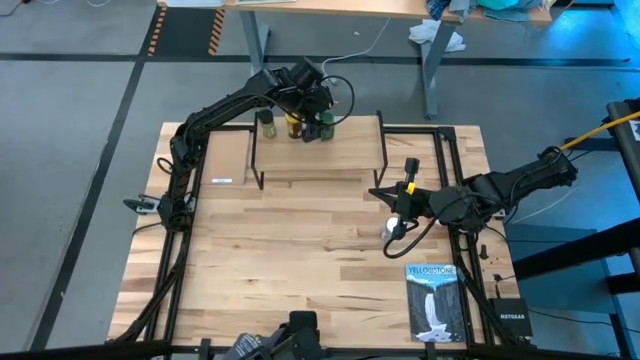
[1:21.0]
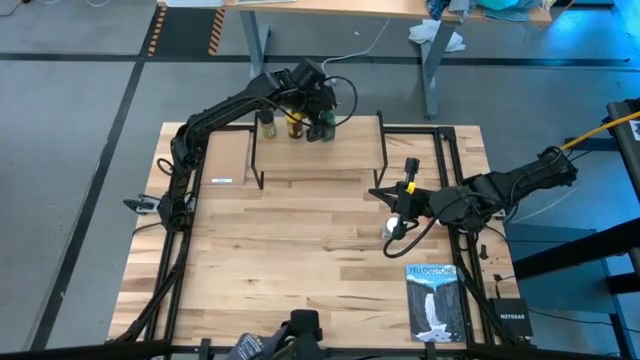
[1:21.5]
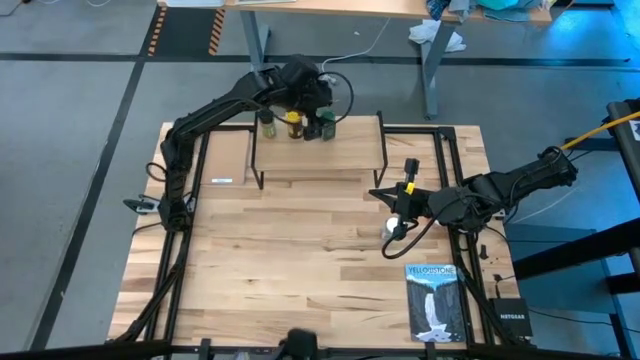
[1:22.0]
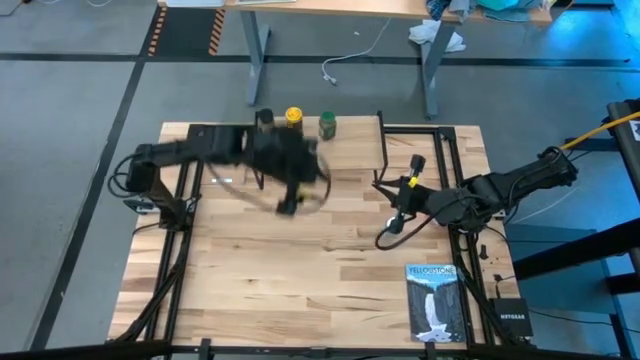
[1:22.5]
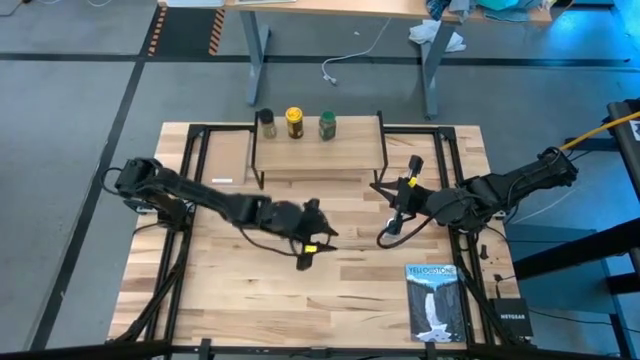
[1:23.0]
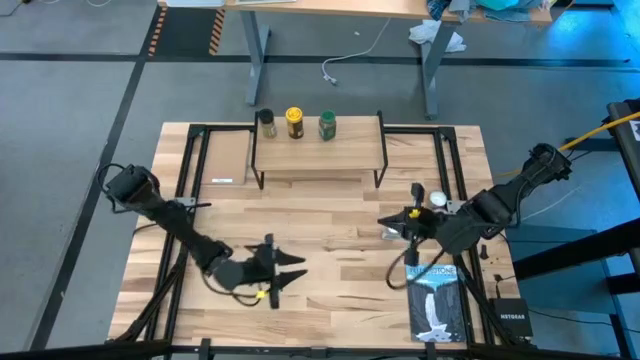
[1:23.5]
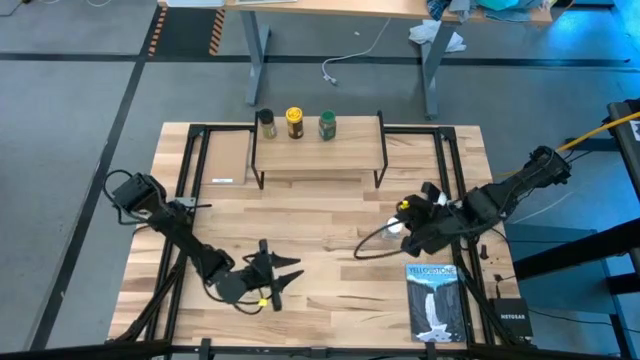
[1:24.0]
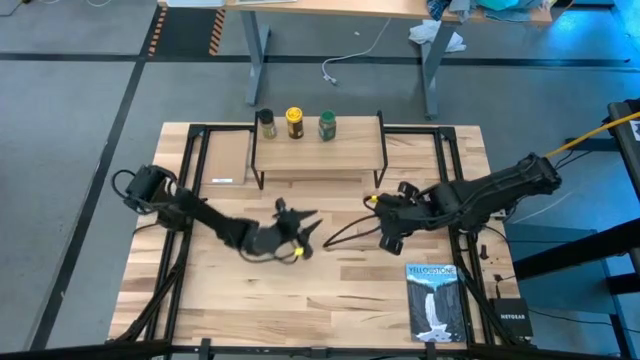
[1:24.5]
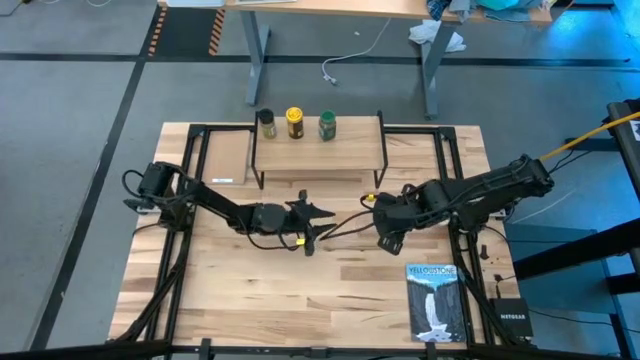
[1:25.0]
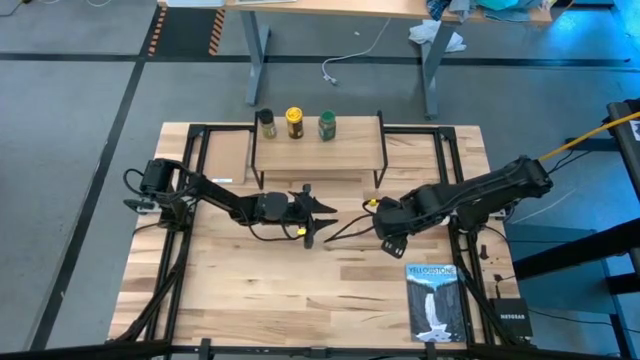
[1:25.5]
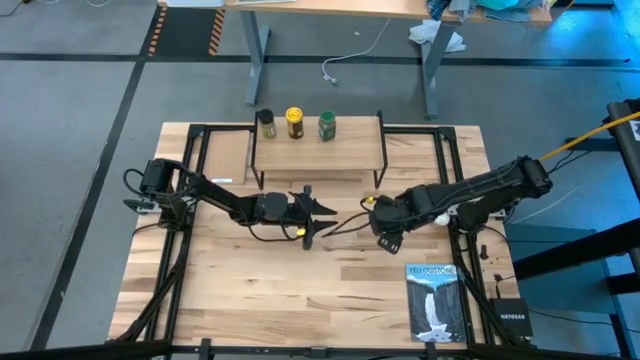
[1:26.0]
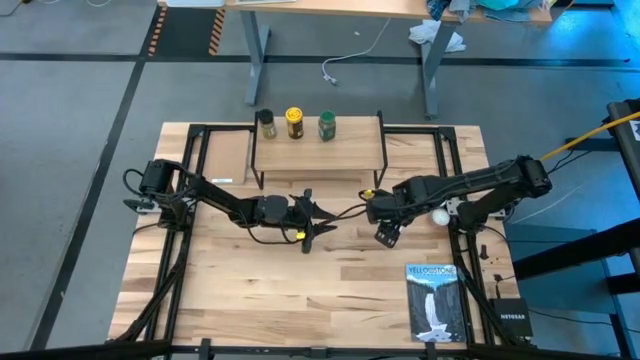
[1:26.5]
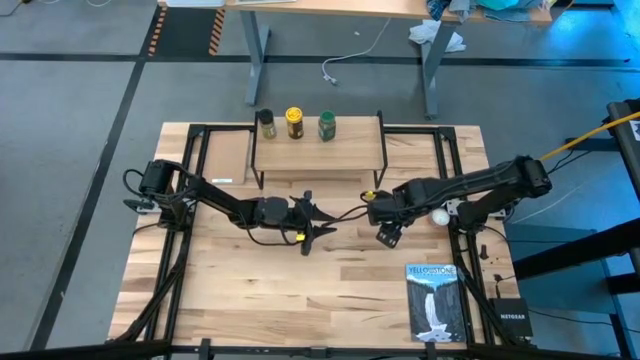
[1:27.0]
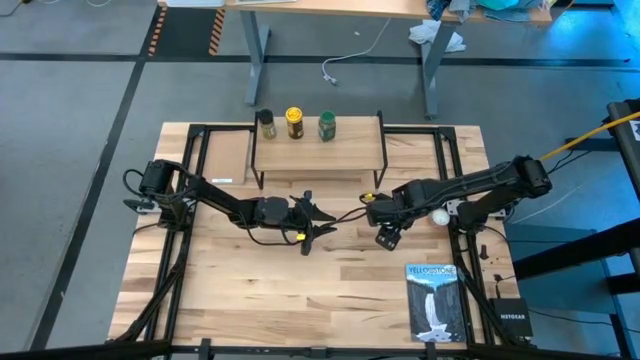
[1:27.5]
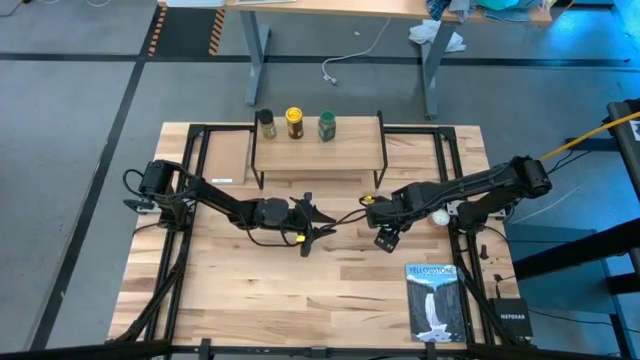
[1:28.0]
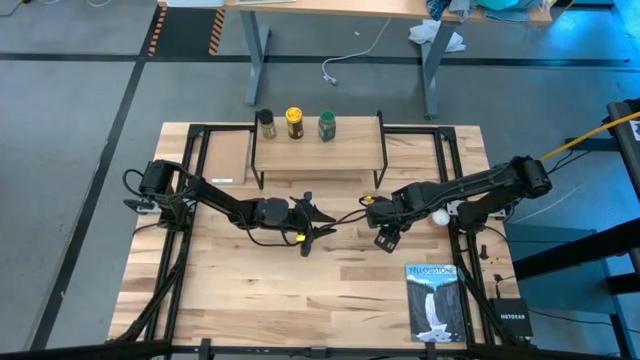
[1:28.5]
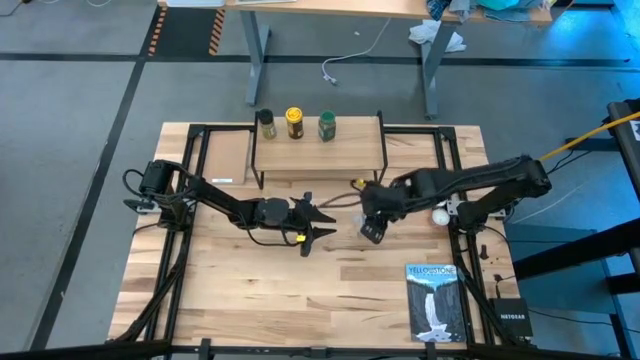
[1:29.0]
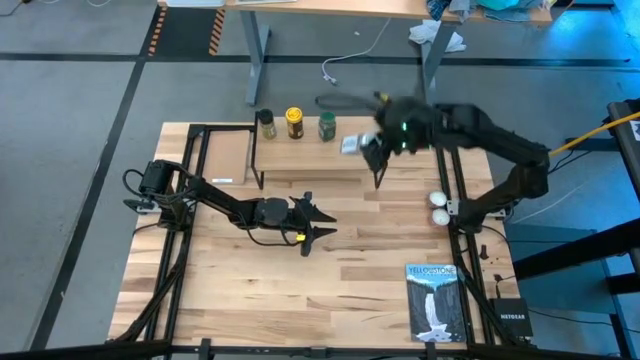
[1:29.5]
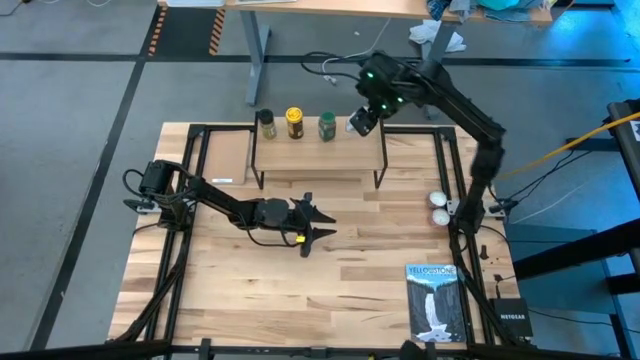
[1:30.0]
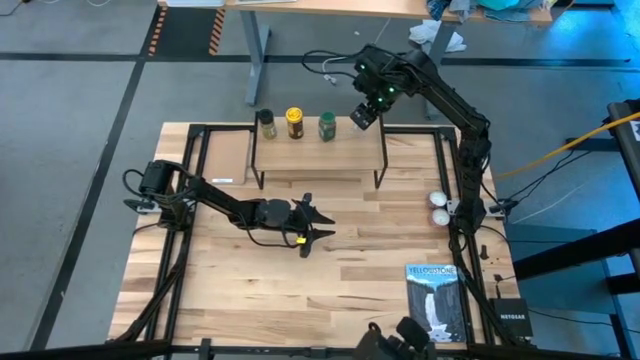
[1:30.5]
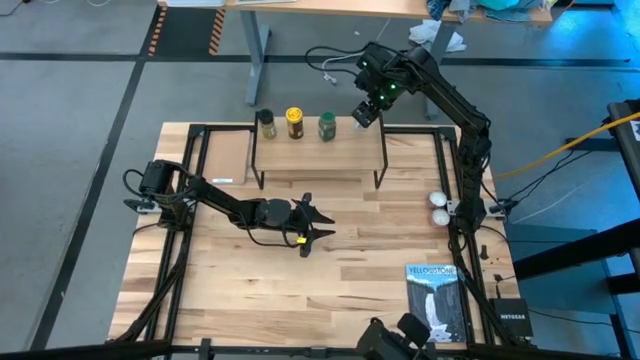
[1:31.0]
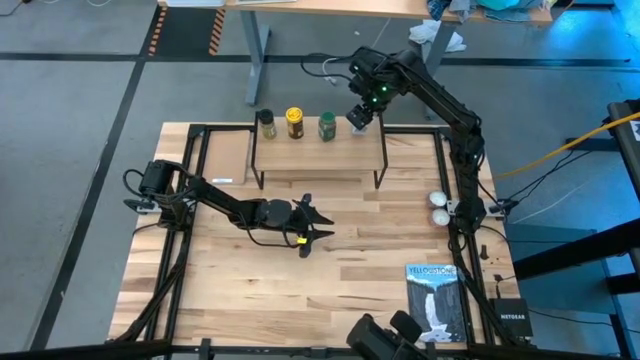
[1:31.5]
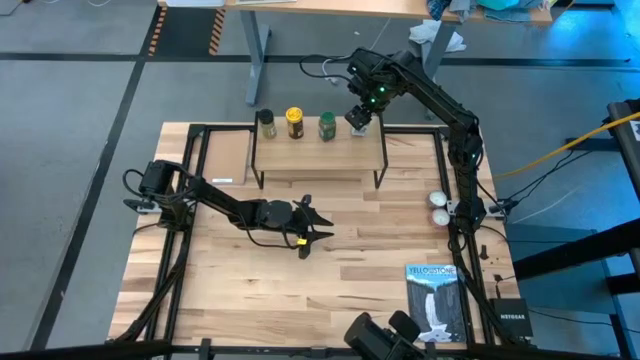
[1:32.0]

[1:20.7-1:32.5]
Task: Shelf spices
Put the white seasoning bottle on the shelf

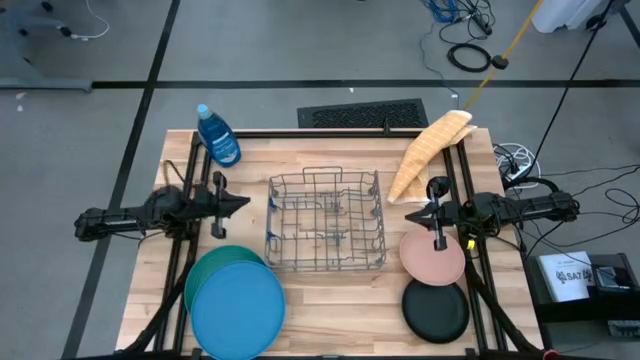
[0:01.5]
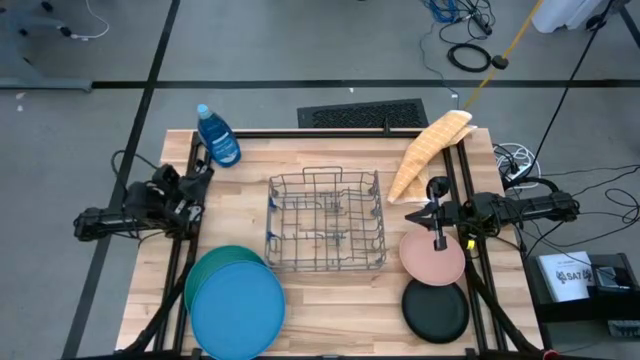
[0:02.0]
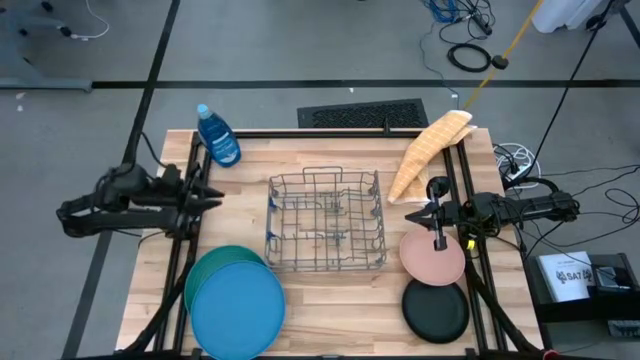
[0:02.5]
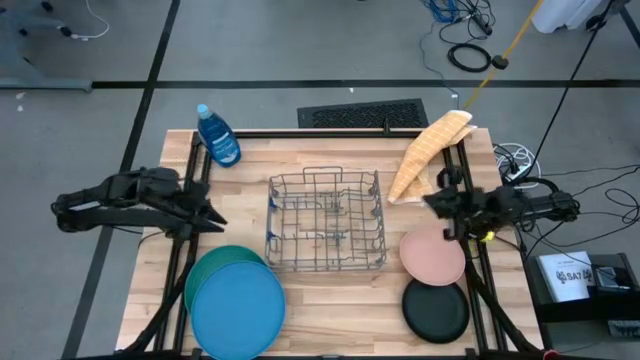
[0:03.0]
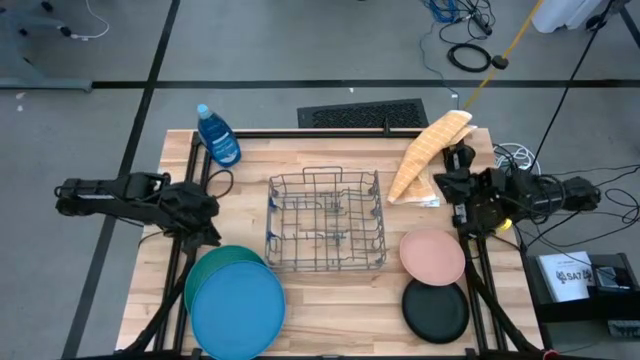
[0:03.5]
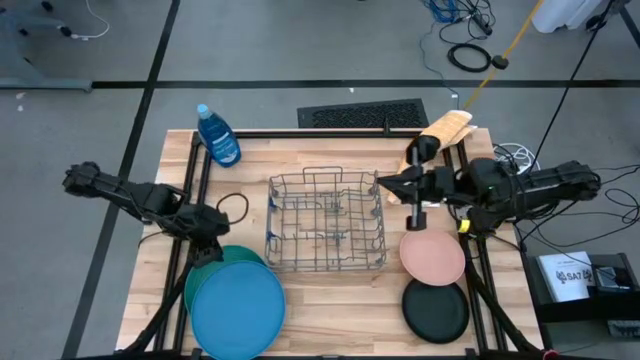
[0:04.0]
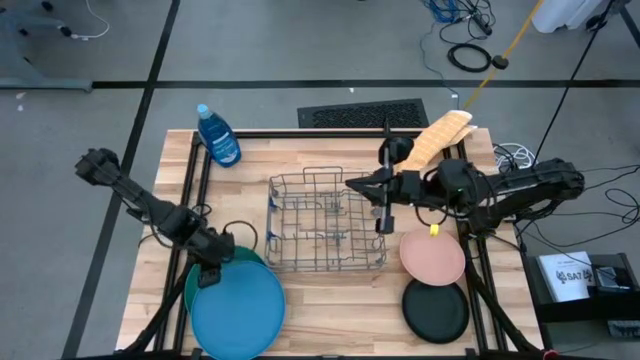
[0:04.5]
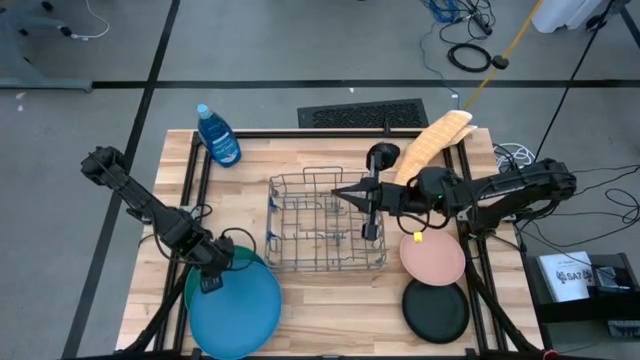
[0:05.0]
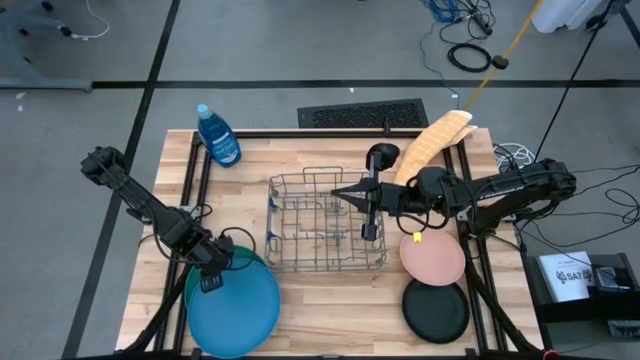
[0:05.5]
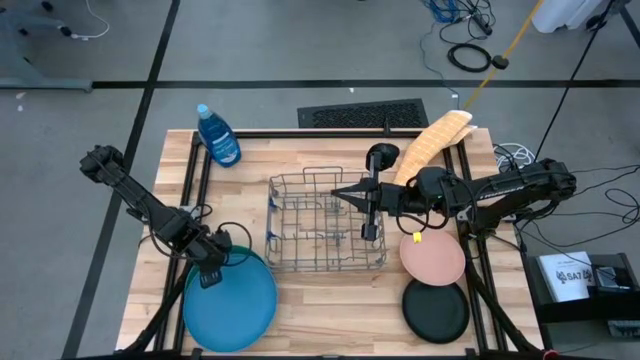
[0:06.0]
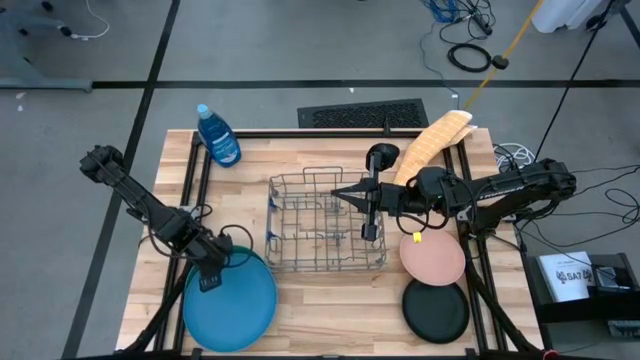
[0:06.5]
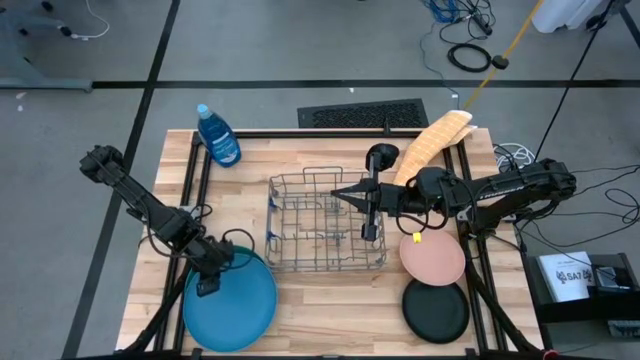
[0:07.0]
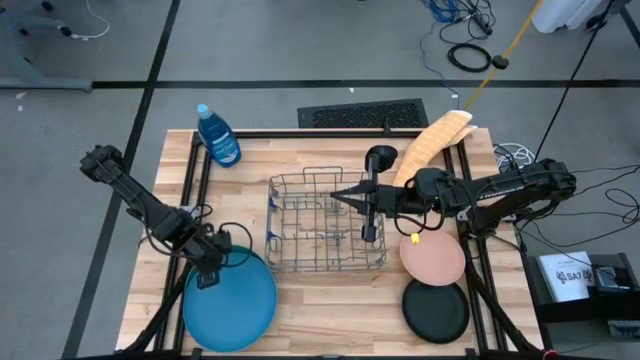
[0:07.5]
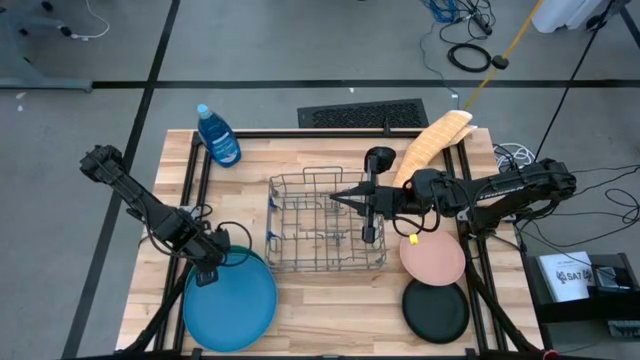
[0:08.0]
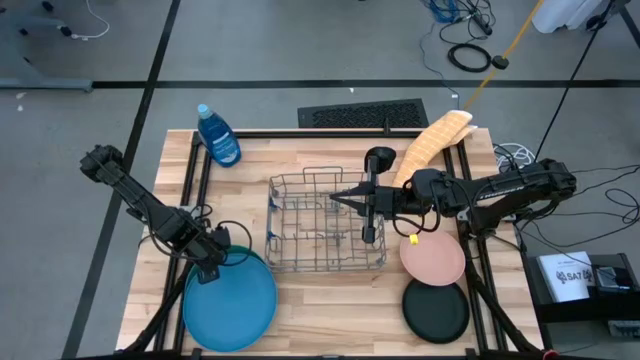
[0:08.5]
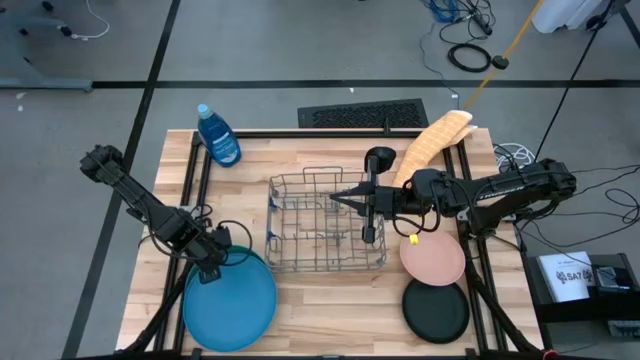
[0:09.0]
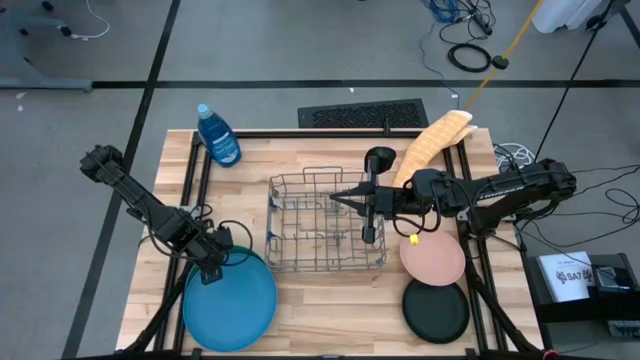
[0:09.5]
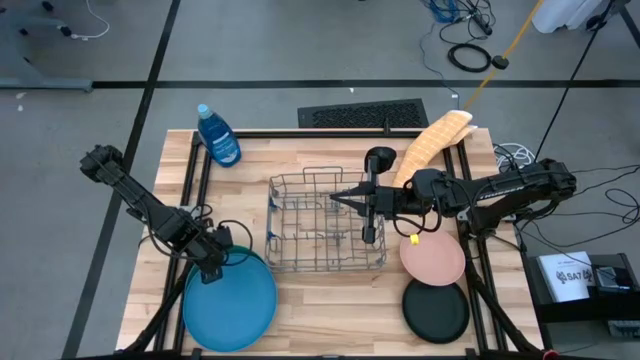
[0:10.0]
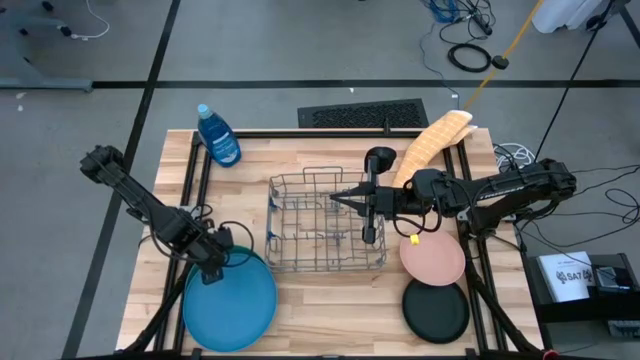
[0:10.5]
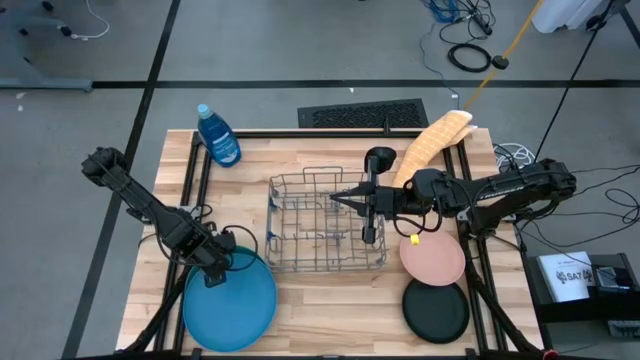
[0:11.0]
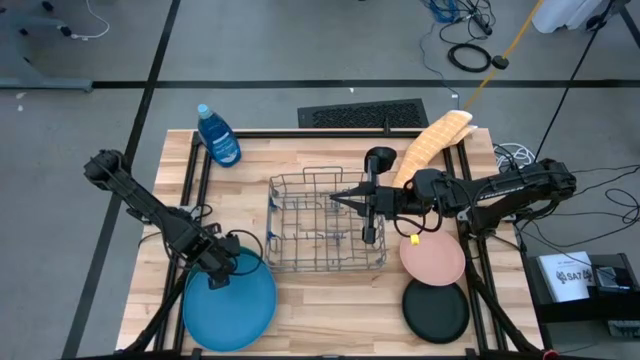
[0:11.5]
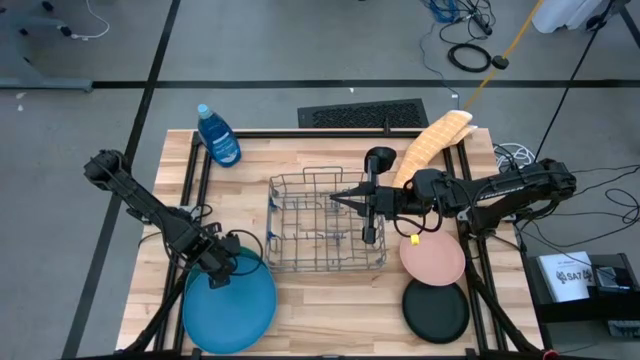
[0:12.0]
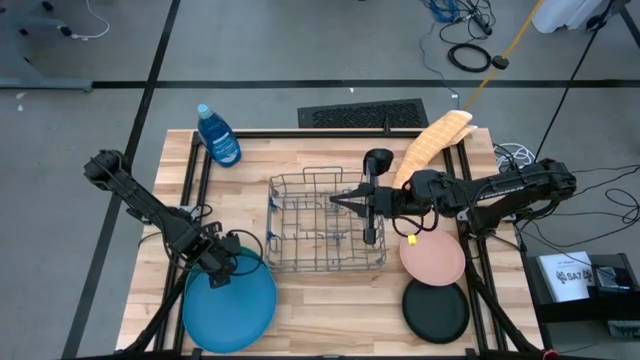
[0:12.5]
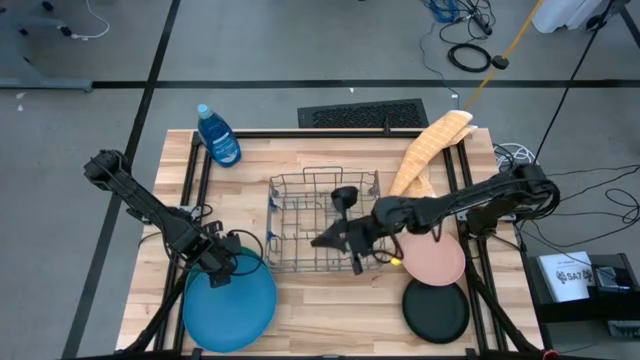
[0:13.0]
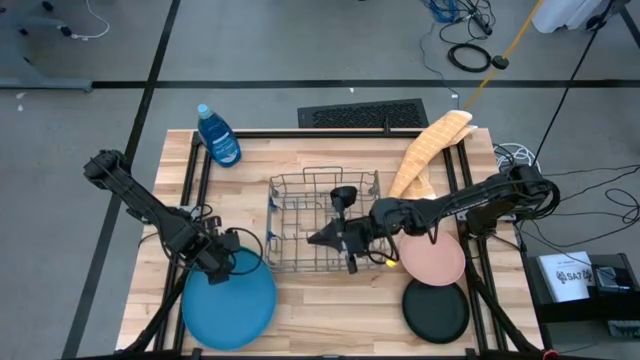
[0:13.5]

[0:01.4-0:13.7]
Task: Sort dishes
Put the blue plate into the dish rack
